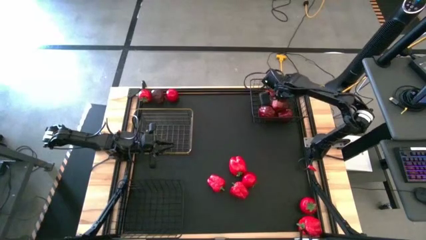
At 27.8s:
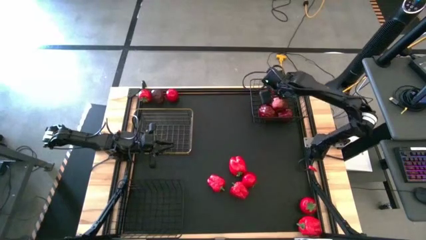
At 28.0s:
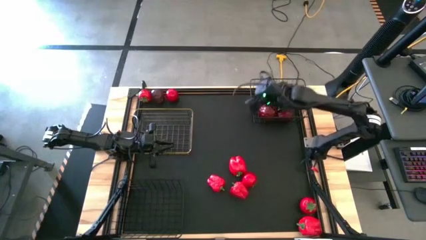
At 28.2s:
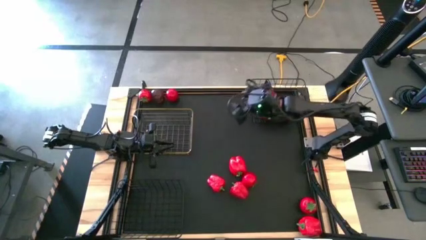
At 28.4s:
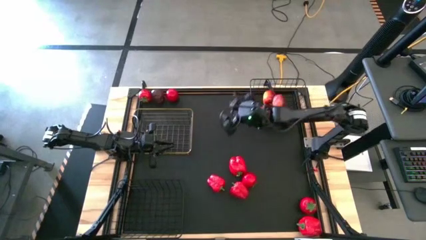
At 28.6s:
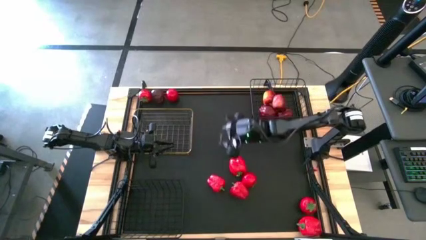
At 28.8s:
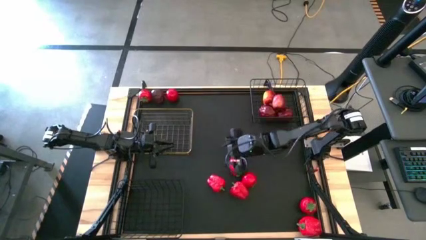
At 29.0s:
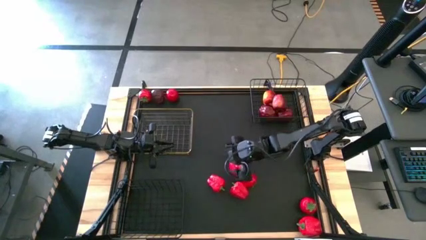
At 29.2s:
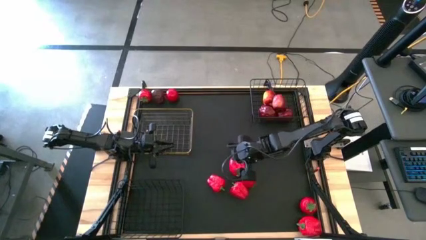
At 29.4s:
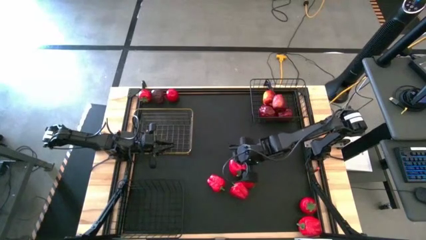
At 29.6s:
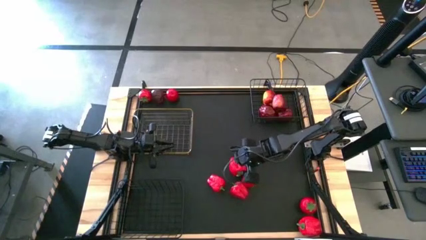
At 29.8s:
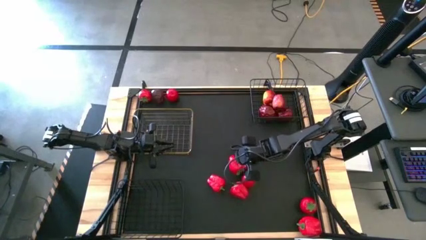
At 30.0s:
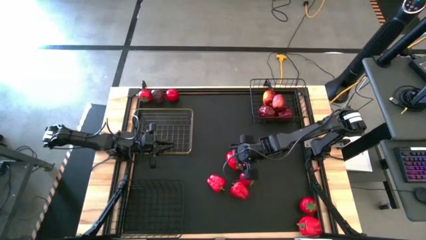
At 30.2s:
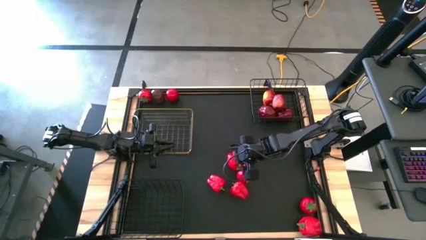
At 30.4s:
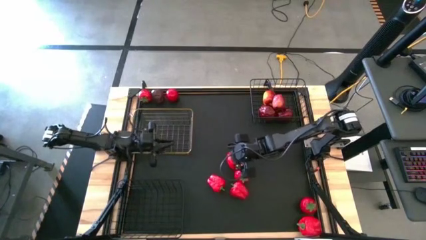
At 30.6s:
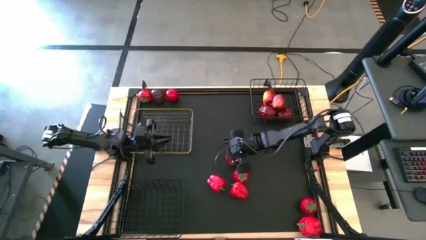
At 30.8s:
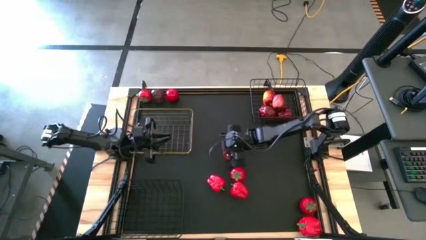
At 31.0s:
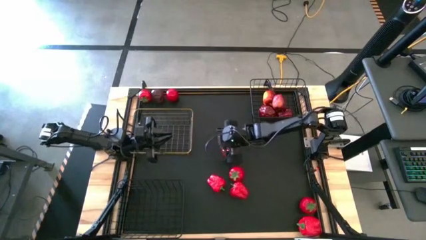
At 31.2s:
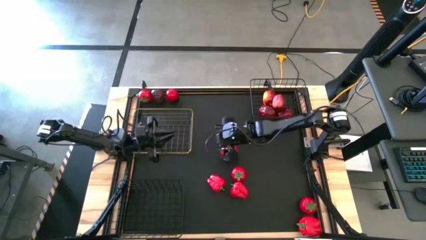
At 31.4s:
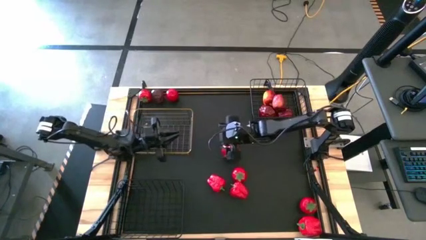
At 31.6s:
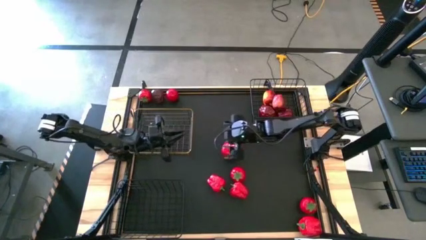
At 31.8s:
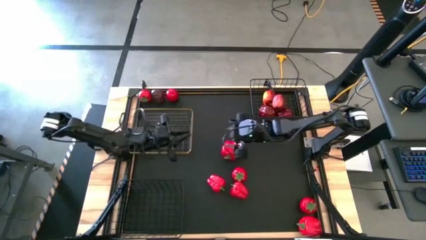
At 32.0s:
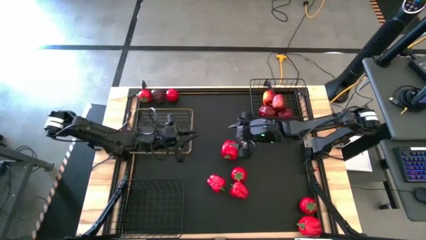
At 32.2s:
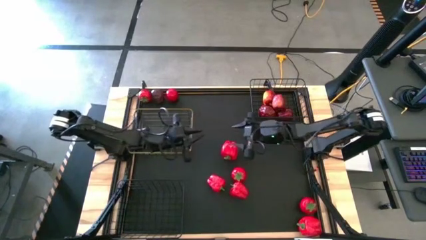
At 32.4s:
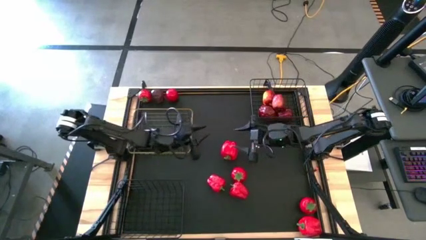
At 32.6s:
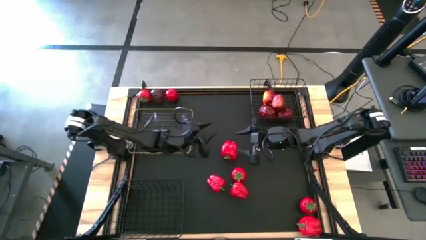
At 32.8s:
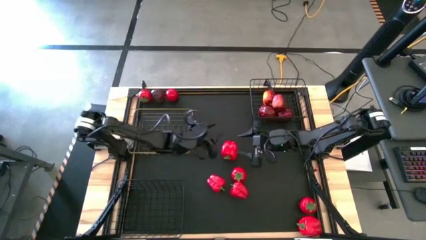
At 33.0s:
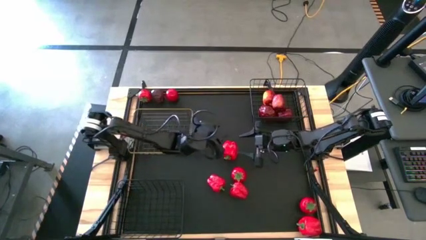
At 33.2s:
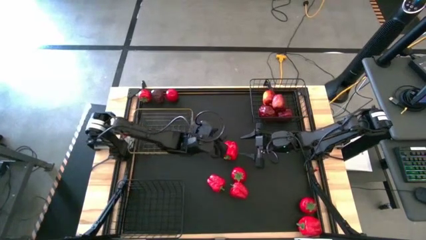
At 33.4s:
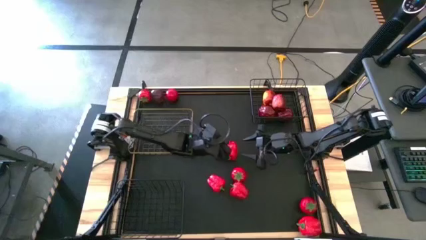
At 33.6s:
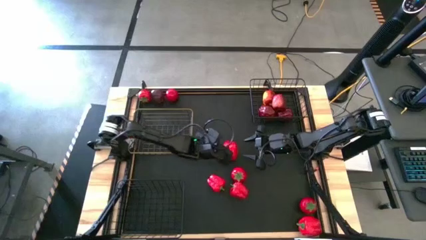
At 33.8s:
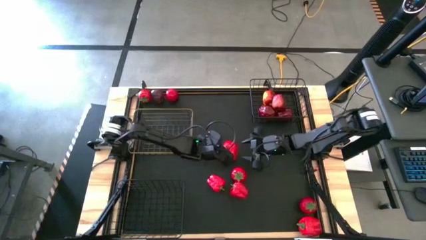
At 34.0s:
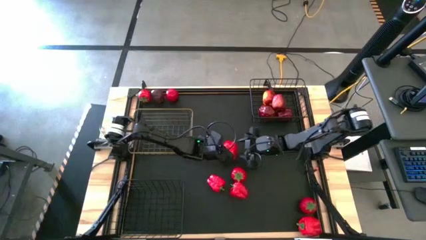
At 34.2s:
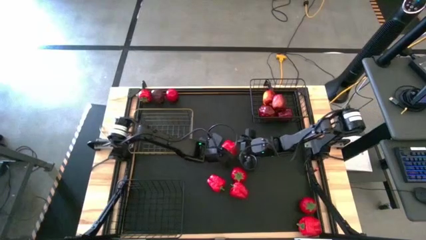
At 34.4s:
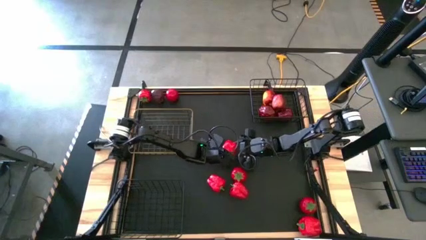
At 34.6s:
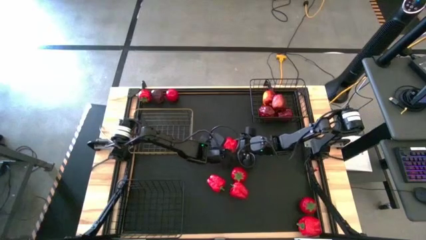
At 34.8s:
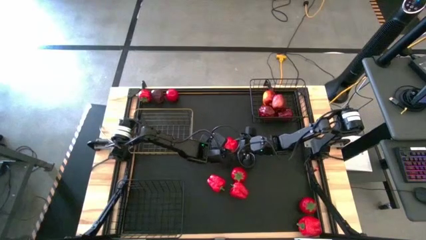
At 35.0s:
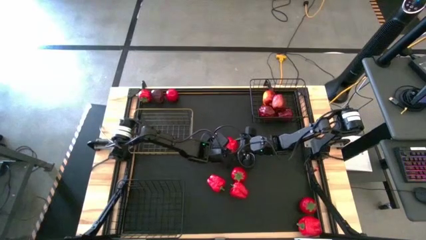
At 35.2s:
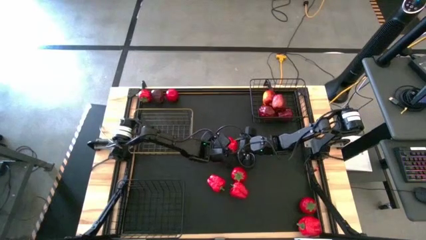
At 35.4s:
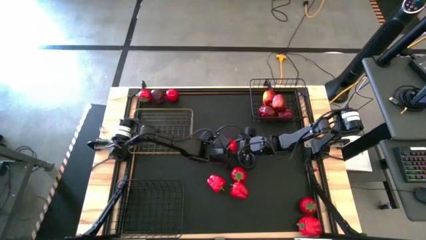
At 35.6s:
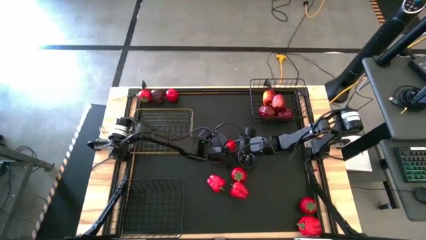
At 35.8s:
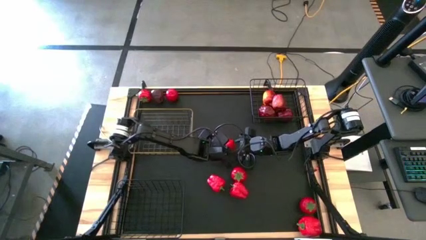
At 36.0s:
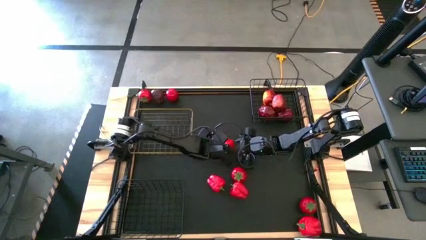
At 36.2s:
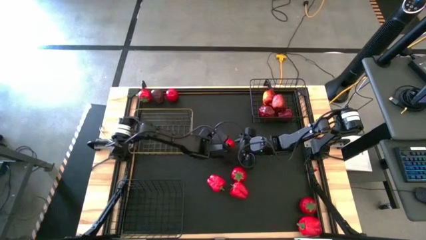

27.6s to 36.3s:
Task: Sort produce into baskets
Put the center bell pepper into the golden basket

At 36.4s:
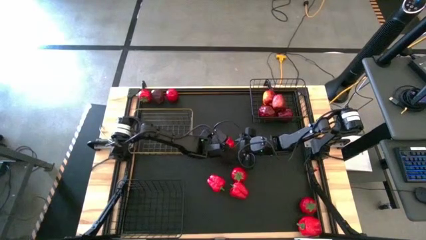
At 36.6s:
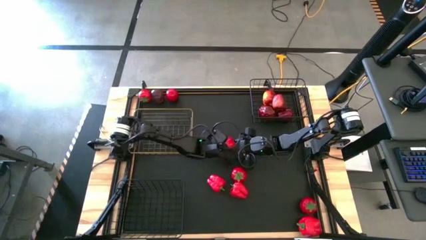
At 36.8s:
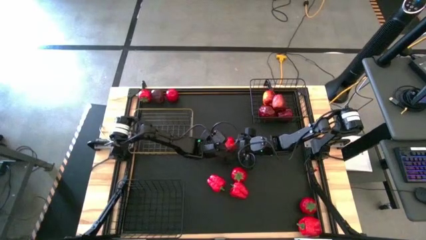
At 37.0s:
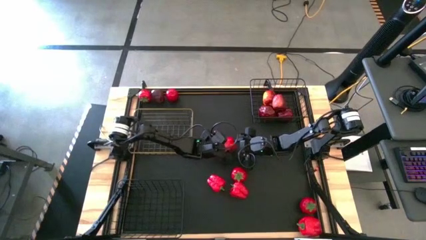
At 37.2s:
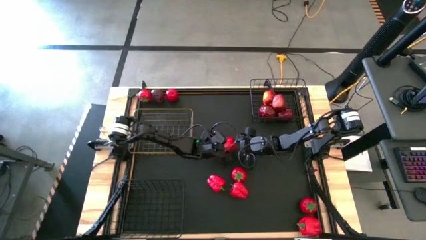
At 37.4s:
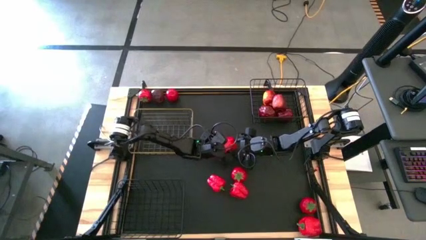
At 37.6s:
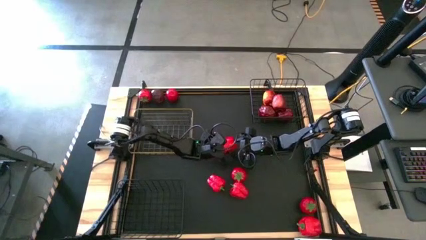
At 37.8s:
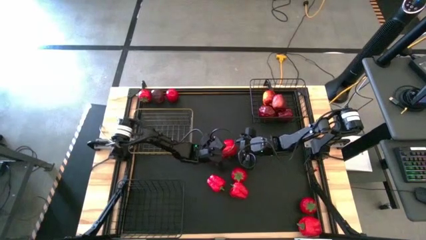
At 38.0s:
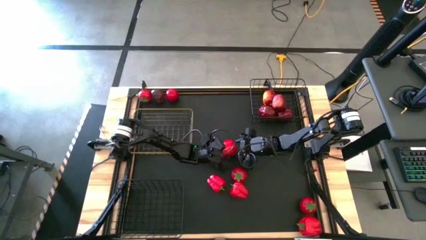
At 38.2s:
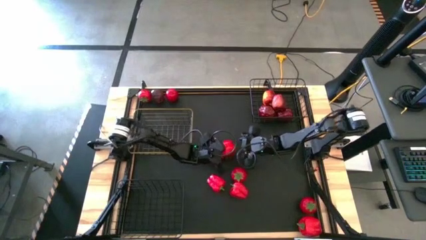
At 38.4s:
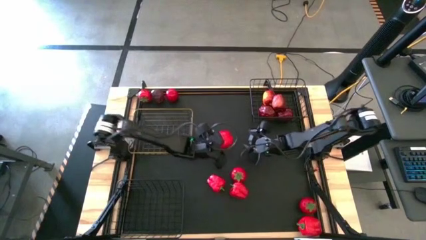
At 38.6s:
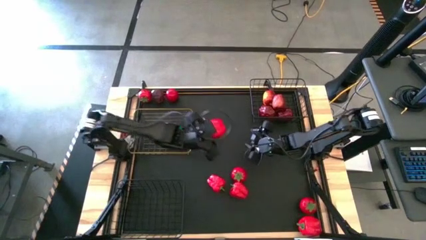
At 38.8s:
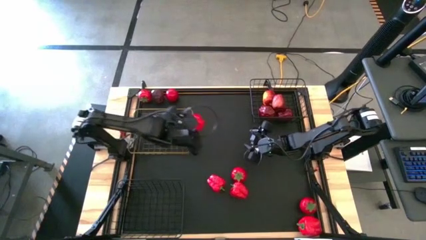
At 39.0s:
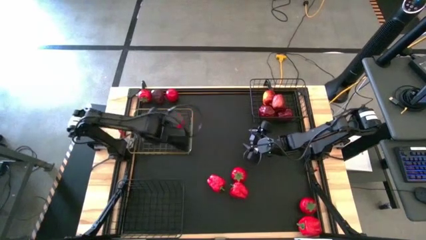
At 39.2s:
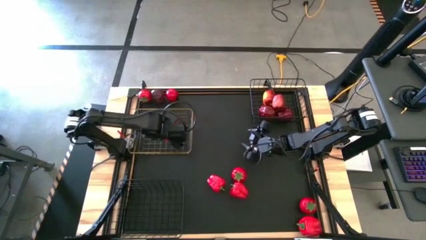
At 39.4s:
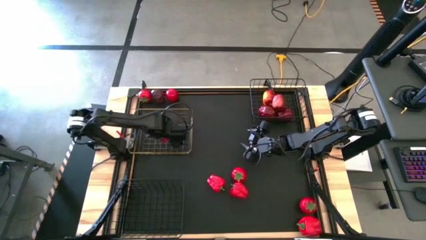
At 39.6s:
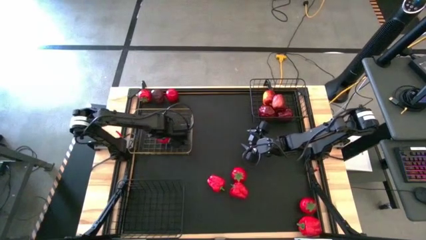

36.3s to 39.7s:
Put the center bell pepper into the golden basket

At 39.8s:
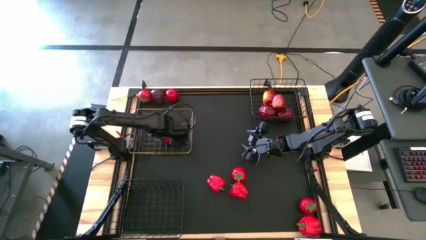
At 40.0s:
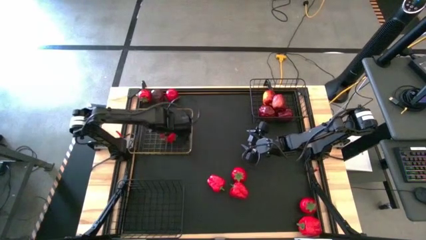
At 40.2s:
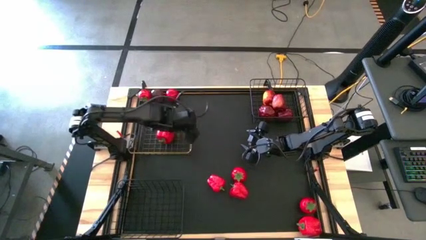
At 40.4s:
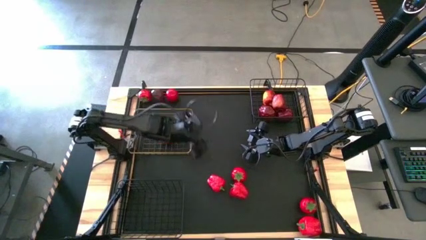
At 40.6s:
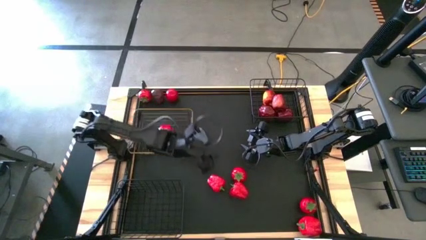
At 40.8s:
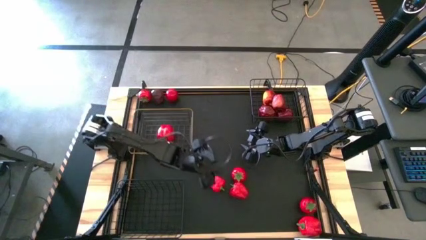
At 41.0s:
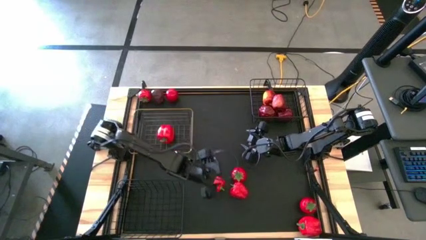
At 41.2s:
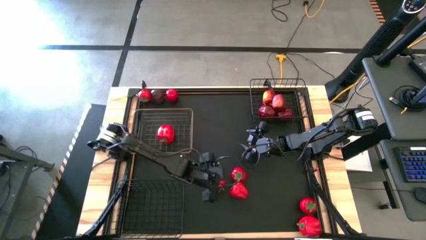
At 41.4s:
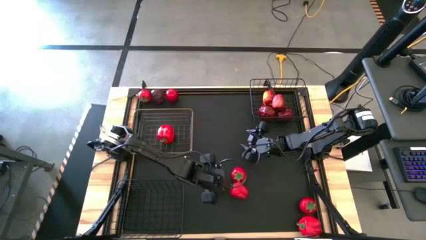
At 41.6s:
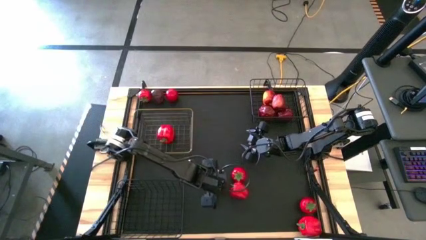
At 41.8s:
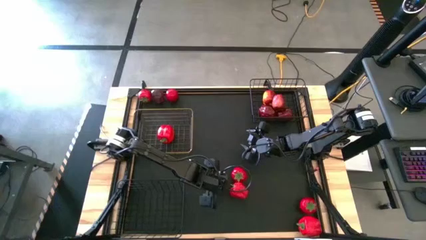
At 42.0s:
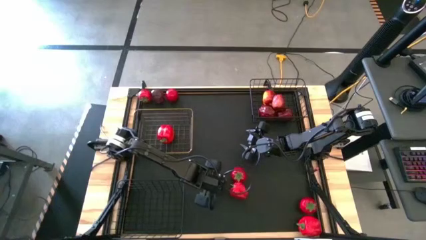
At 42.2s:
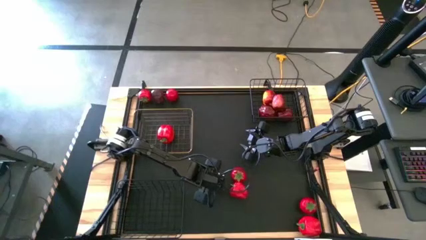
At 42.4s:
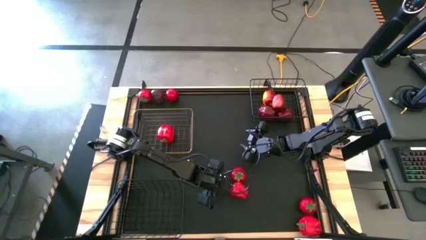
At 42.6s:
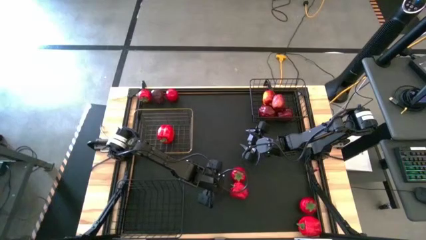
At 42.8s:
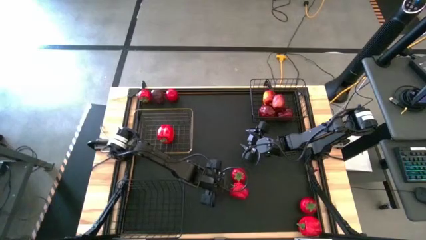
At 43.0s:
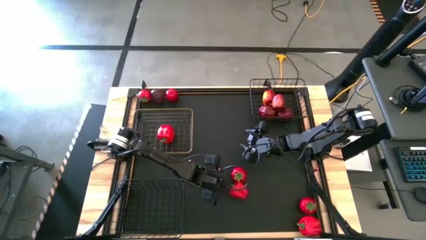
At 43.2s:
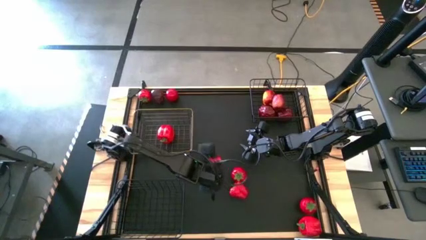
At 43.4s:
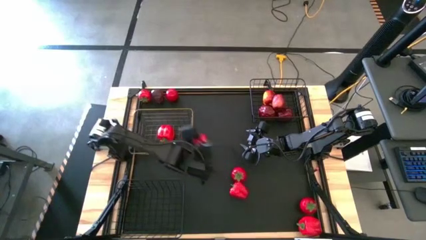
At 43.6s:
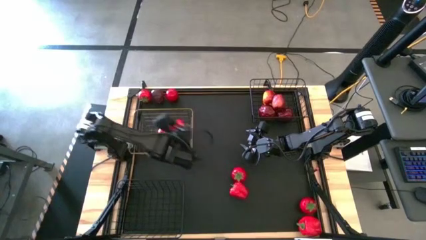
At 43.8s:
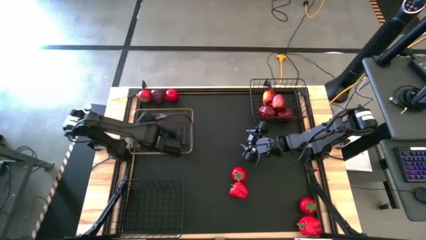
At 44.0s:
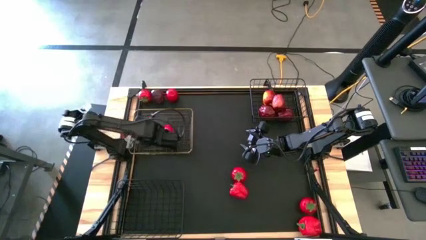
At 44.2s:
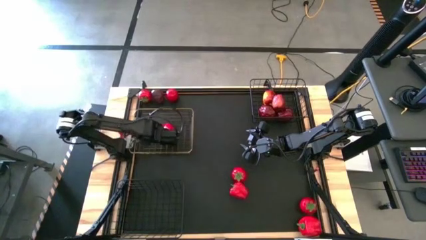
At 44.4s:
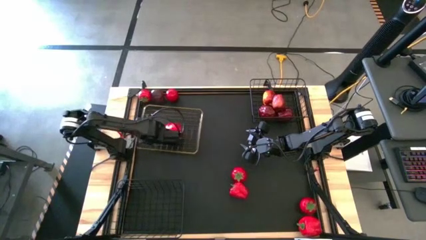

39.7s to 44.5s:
Put the bottom left bell pepper into the golden basket
